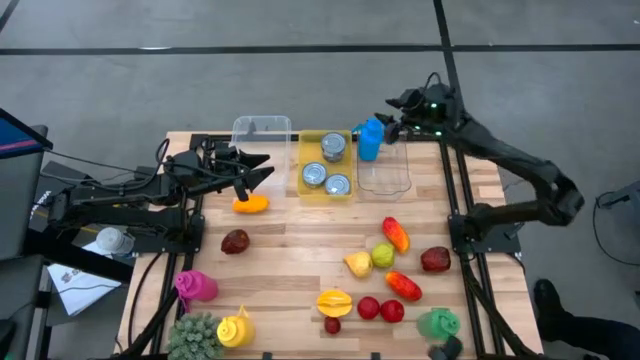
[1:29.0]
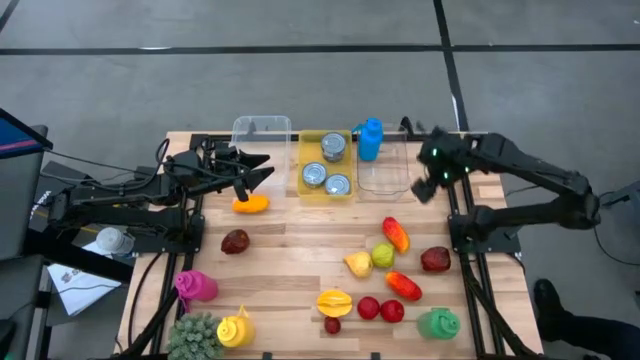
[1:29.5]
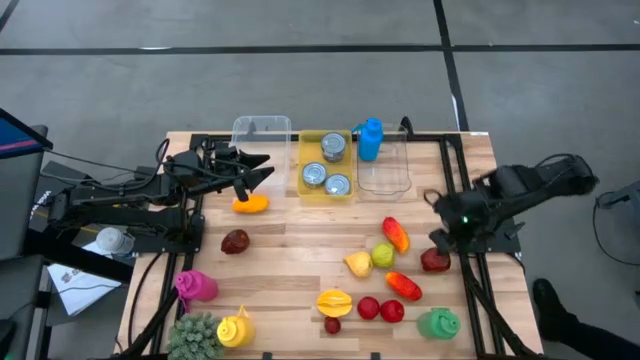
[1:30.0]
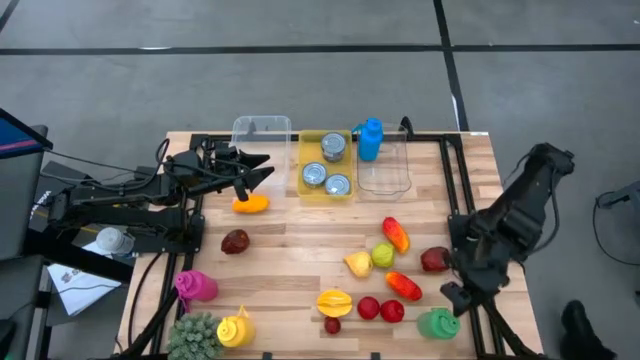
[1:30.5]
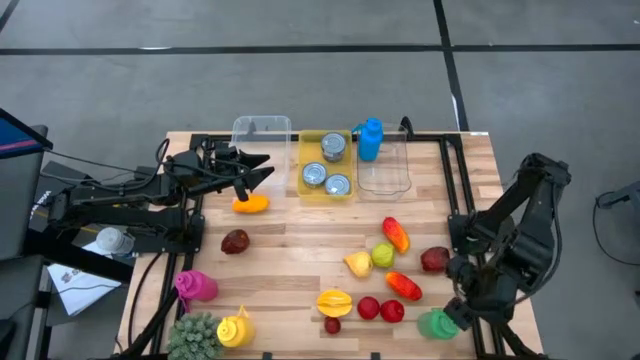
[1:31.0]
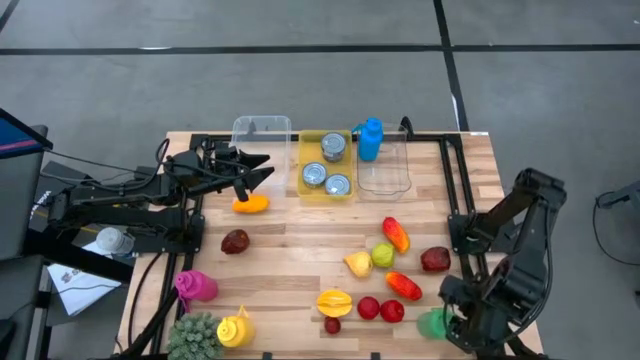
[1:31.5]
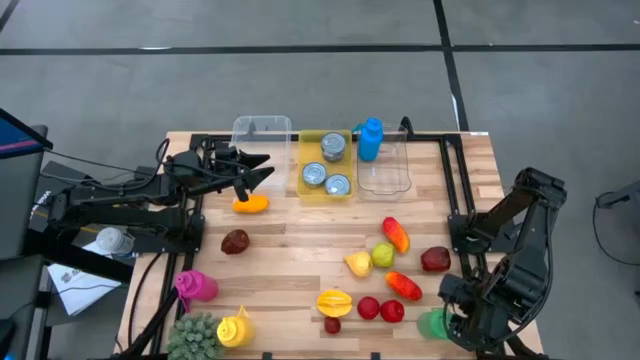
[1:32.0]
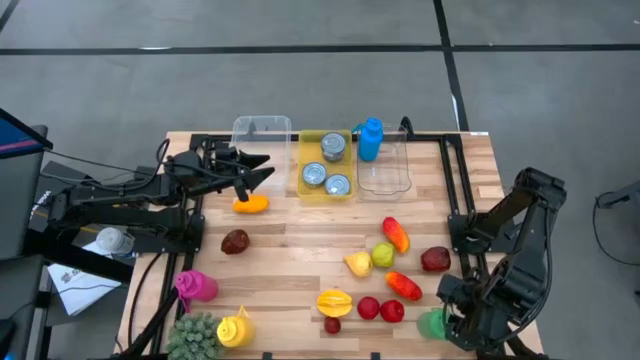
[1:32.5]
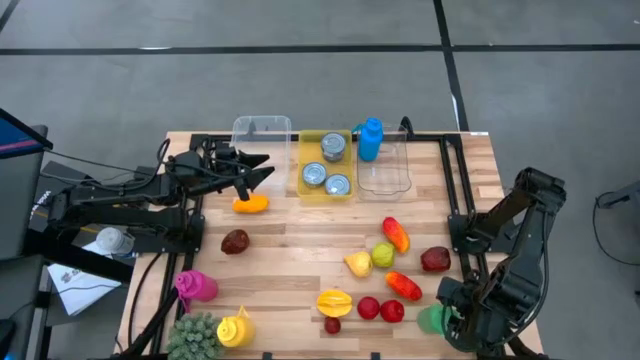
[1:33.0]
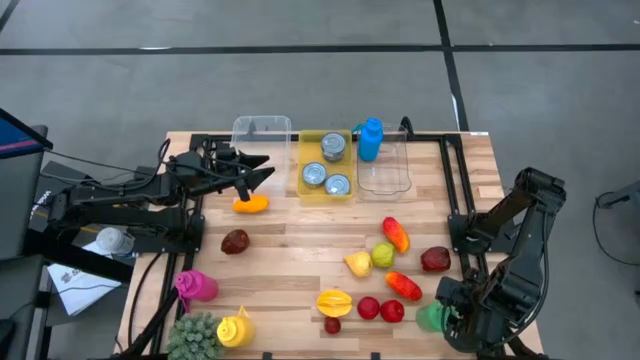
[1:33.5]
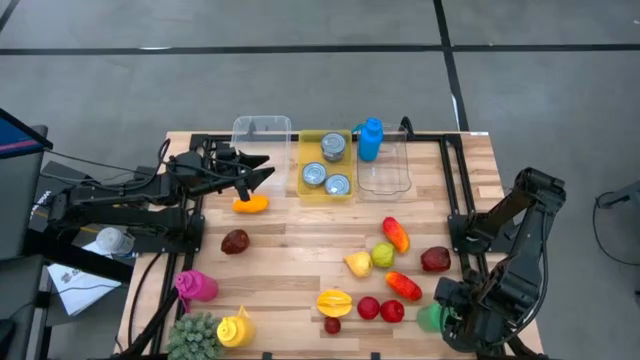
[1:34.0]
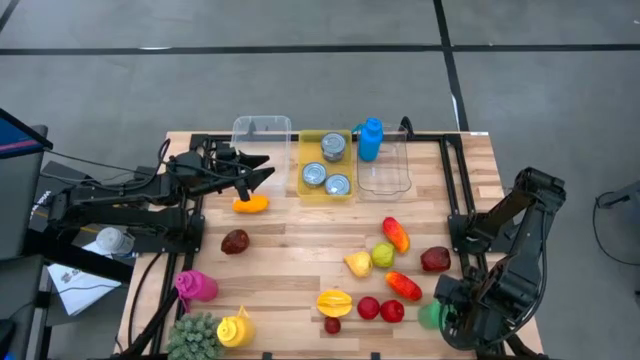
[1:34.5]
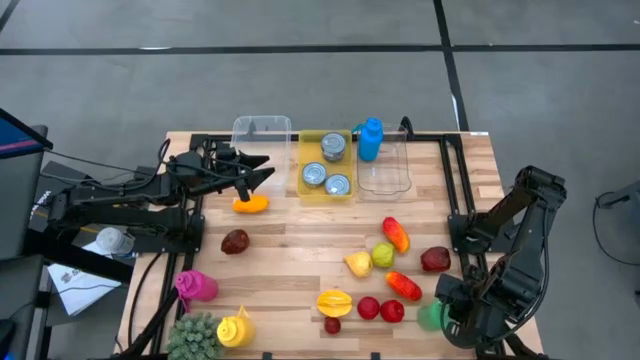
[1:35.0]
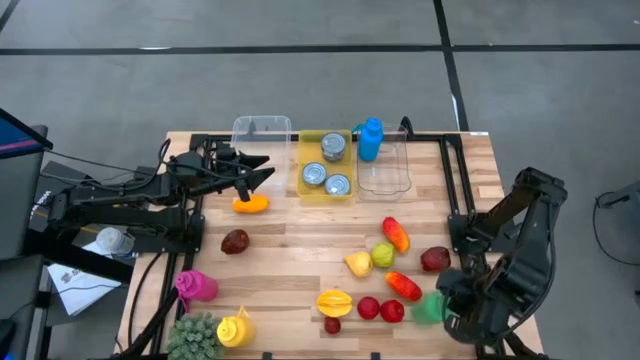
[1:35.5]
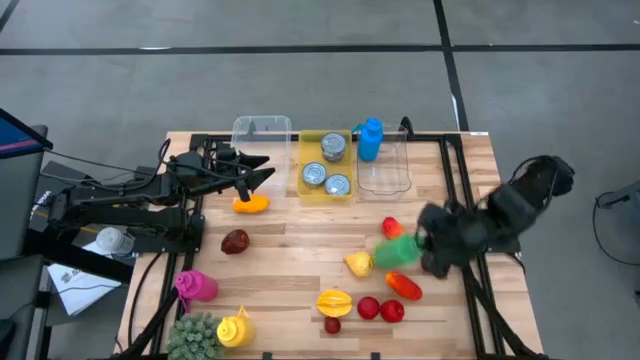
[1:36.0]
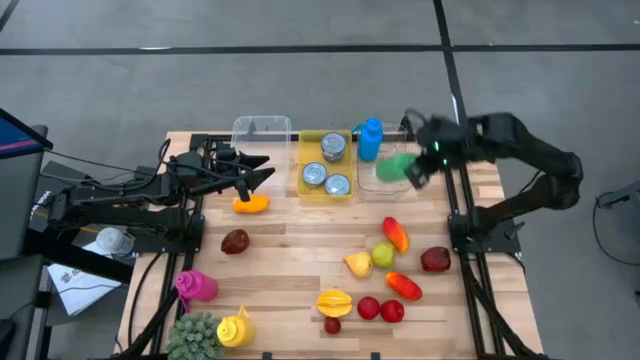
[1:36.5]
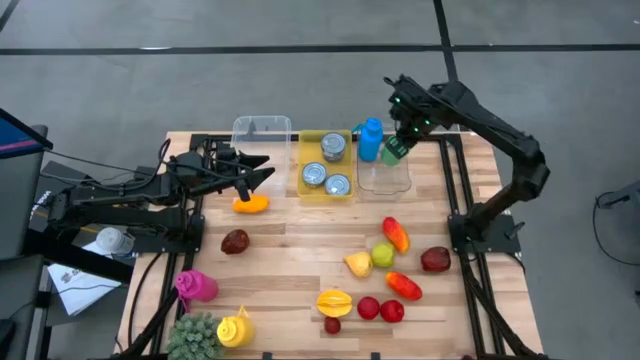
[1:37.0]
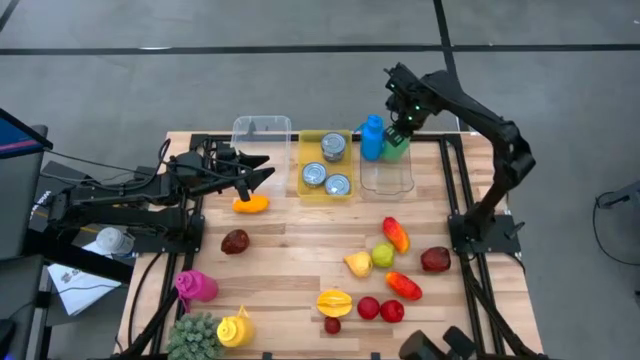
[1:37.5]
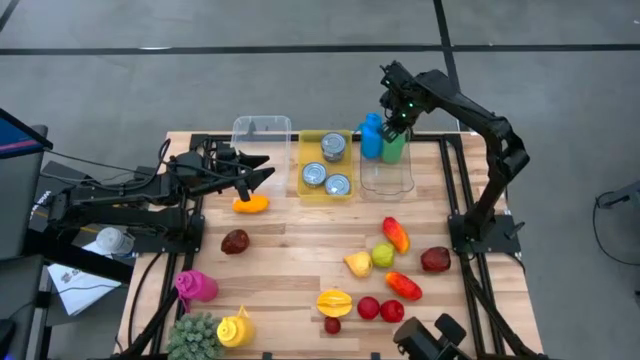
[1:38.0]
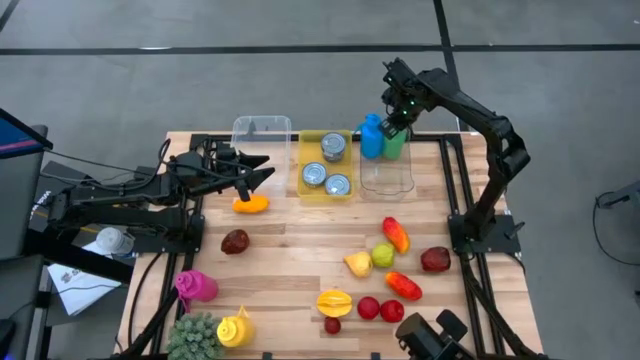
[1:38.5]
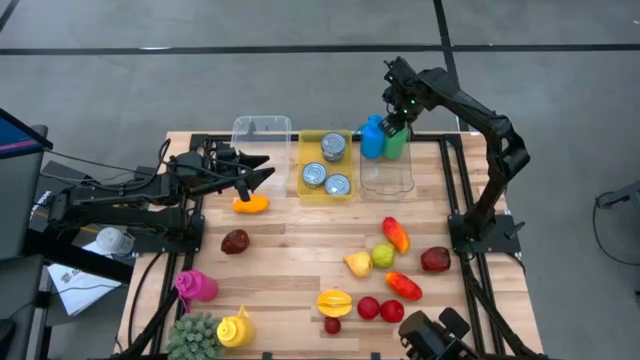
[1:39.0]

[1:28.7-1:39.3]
Task: Pick & Place Food Item
Put the green tumbler into the transparent bin

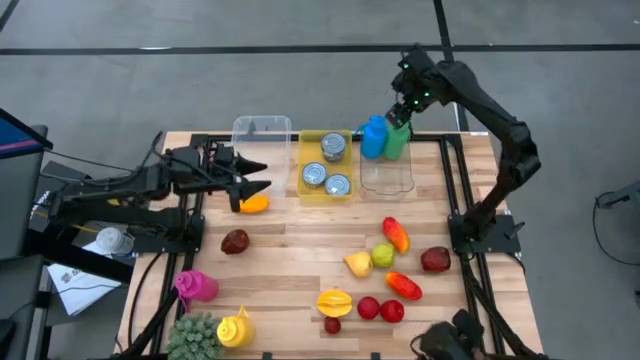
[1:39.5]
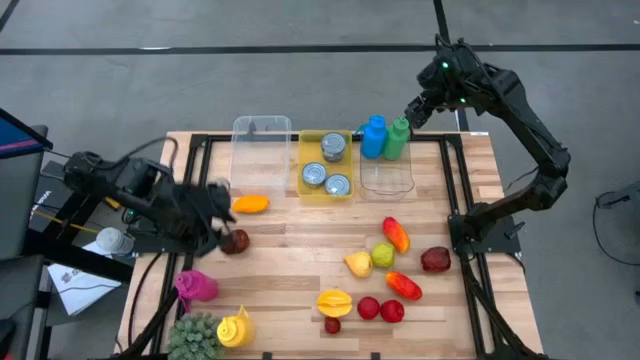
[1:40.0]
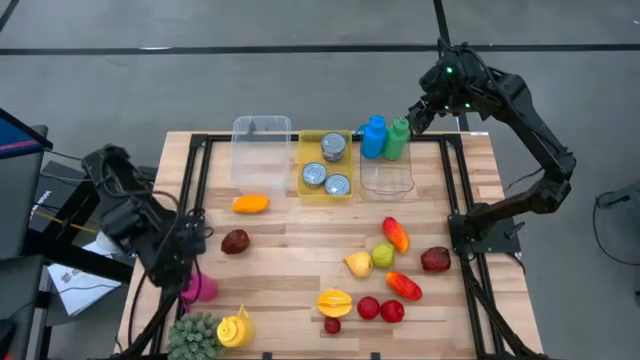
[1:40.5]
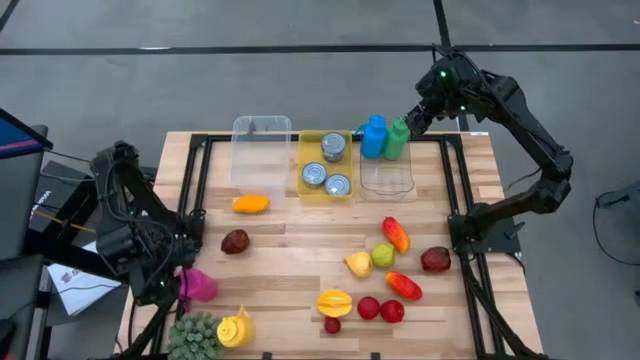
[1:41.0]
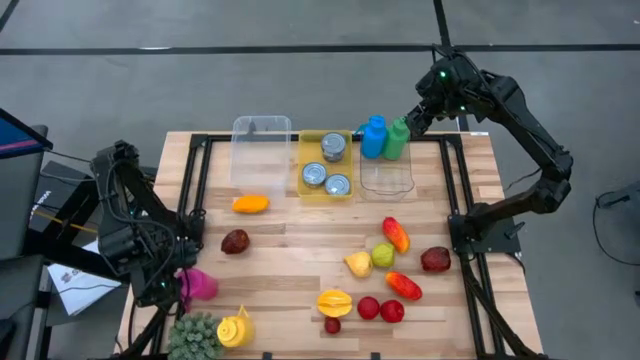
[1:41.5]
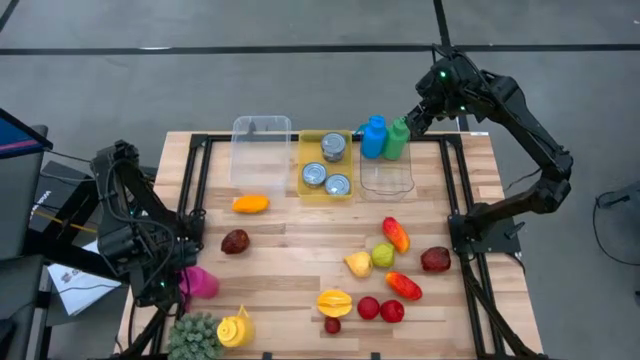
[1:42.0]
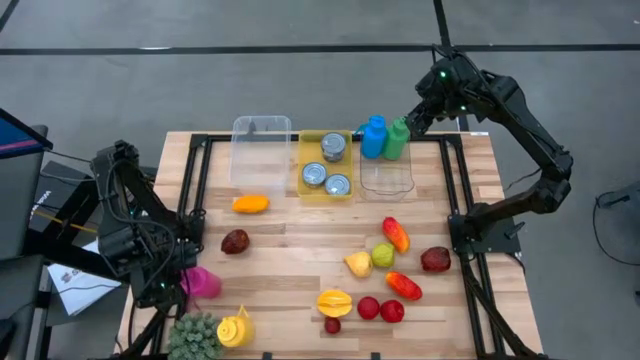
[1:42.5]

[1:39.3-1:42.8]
Put the pink tumbler into the transparent bin

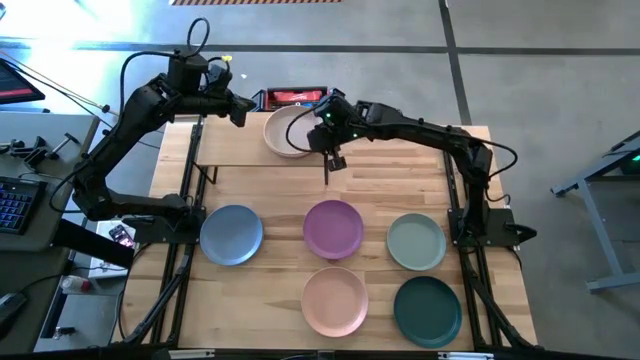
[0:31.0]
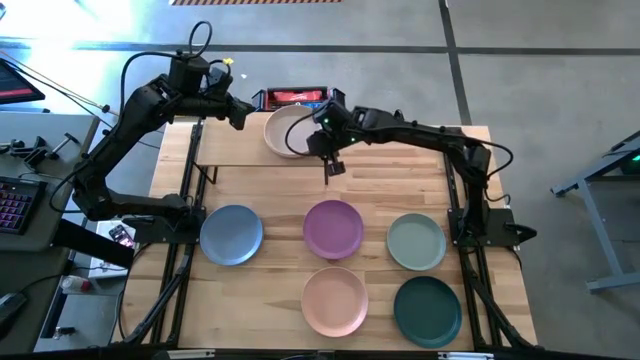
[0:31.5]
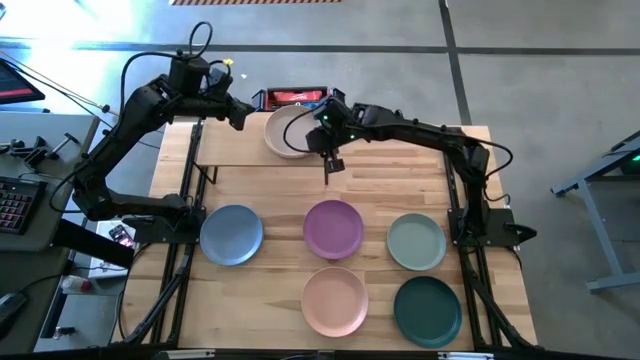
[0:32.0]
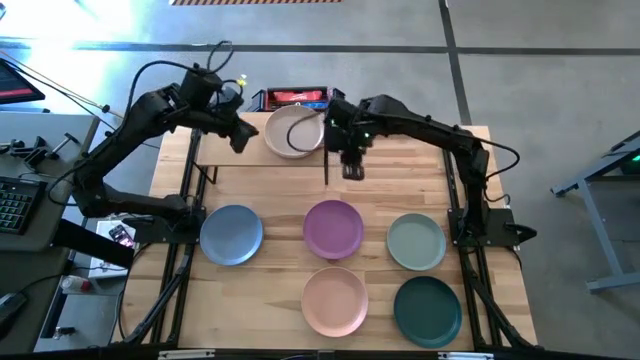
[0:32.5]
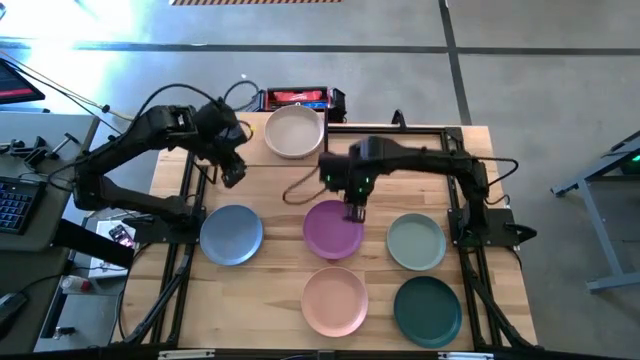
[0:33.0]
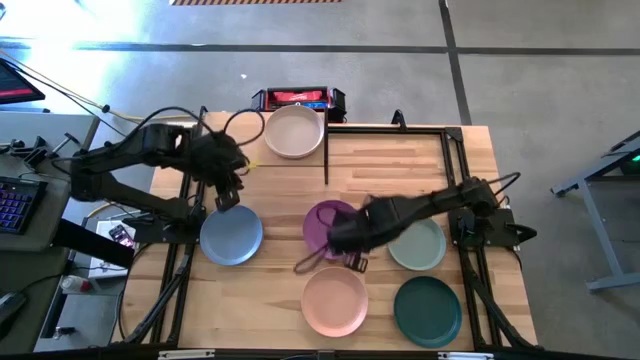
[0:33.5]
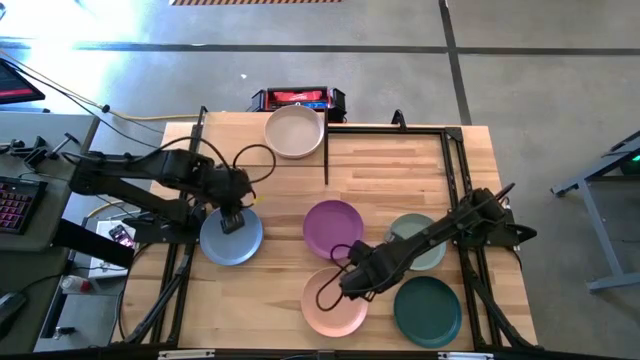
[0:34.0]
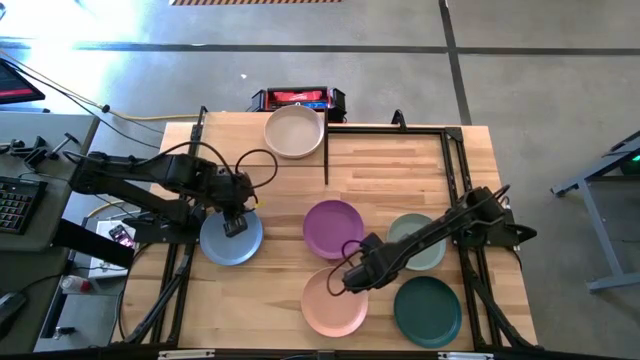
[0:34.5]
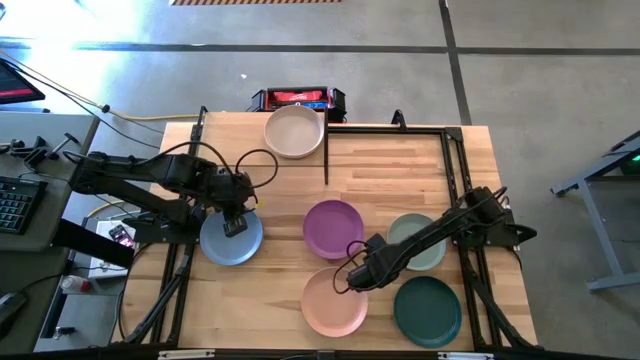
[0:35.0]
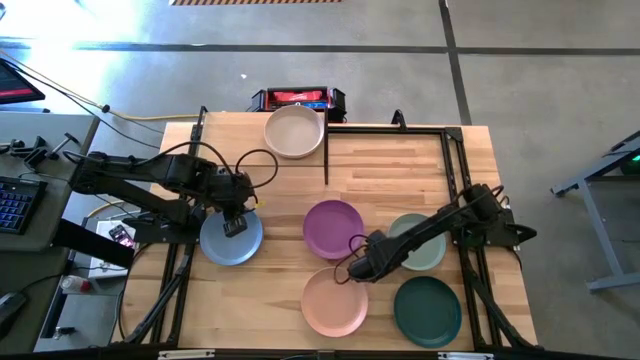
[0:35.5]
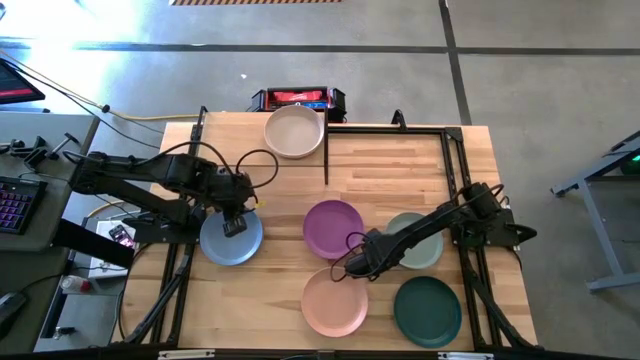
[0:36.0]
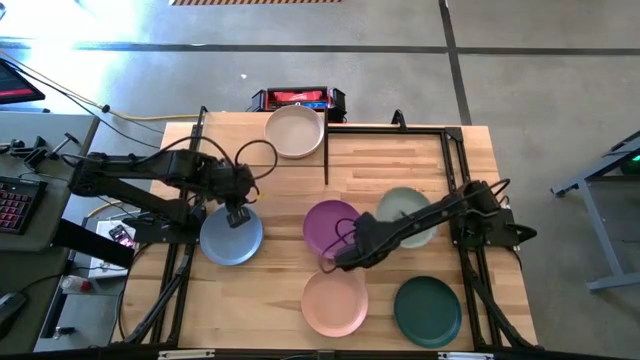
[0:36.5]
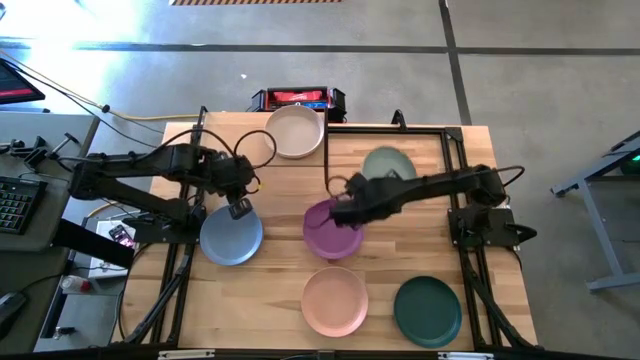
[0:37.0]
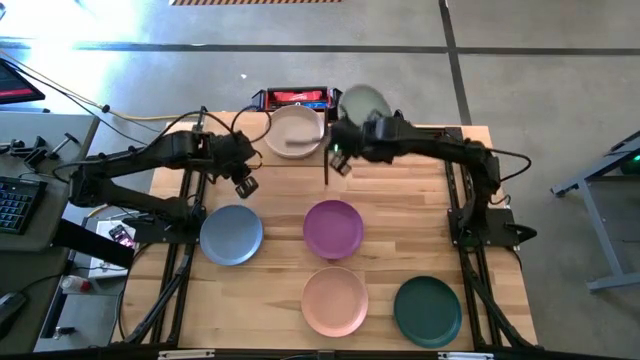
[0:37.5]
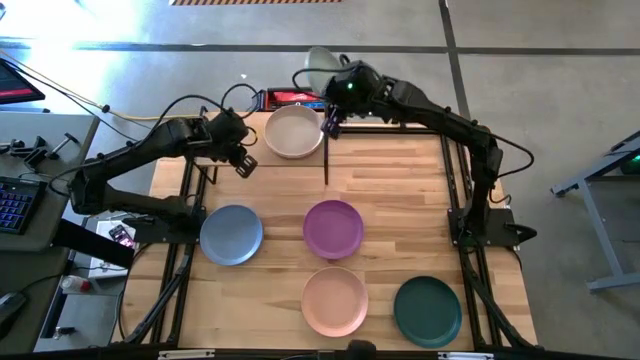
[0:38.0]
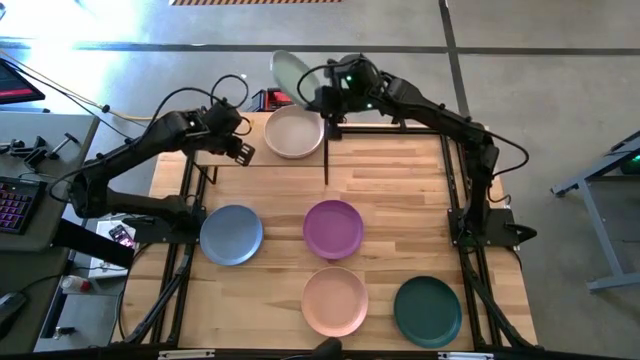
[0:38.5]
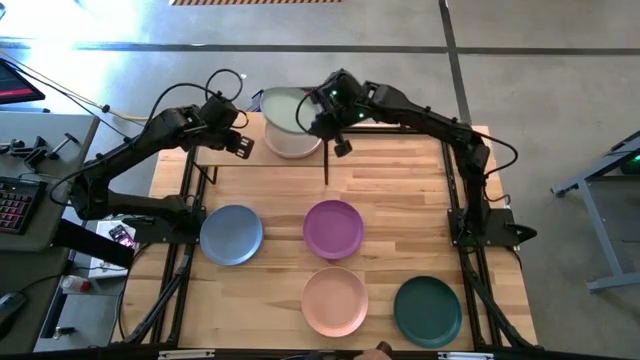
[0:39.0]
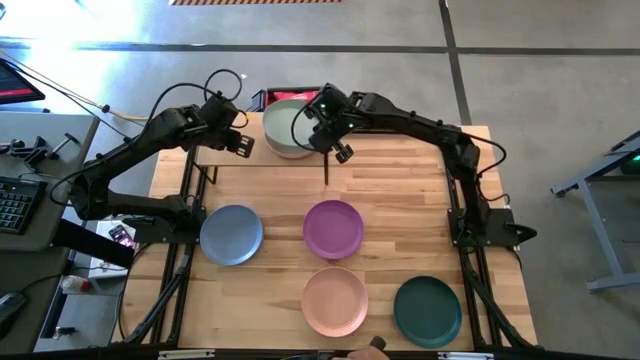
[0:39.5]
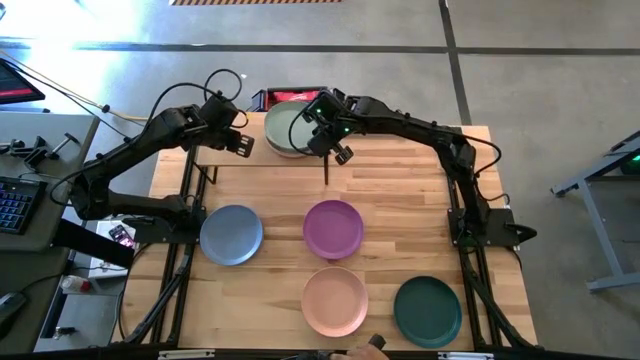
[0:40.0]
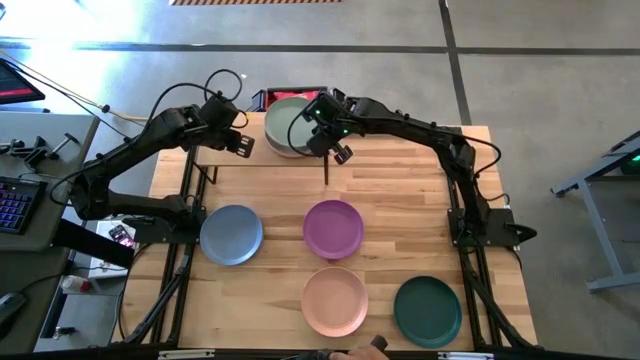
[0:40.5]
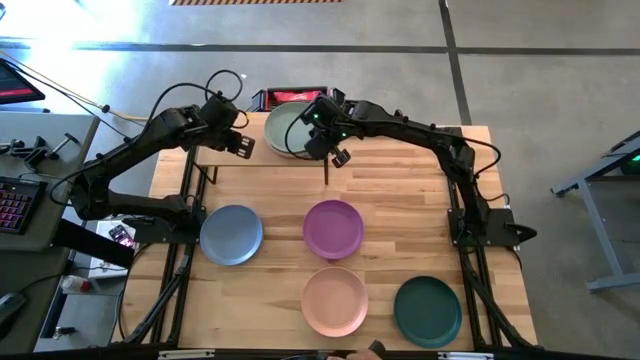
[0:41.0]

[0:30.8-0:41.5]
Task: Place and stack plates onto a shelf
Stack the light green plate on top of the white plate on the shelf
